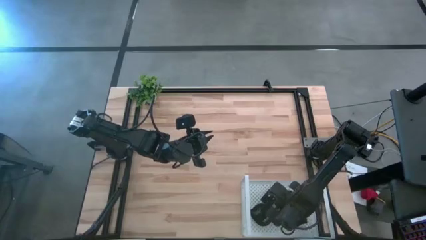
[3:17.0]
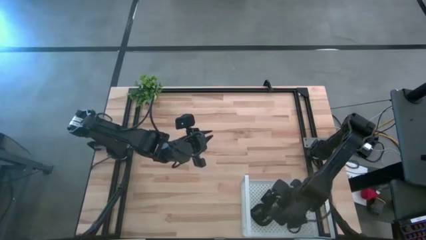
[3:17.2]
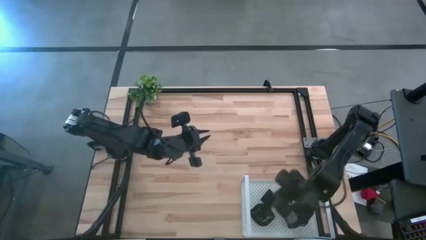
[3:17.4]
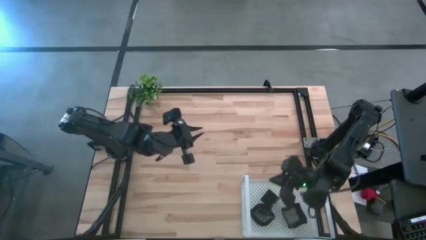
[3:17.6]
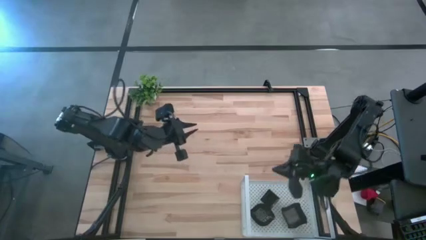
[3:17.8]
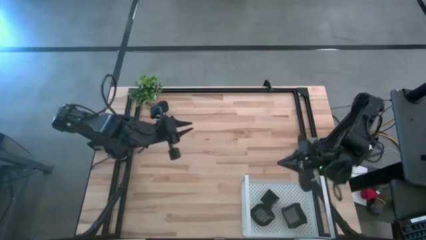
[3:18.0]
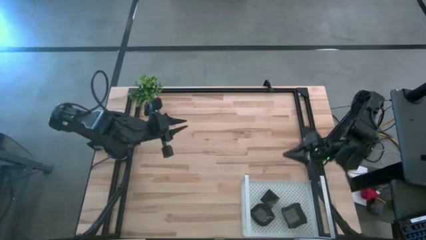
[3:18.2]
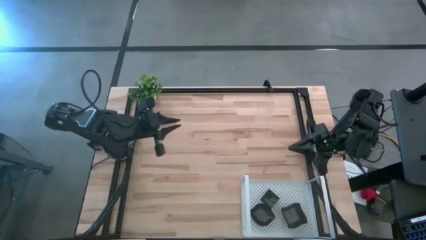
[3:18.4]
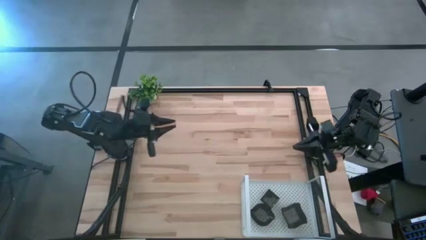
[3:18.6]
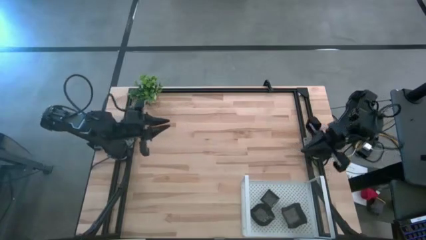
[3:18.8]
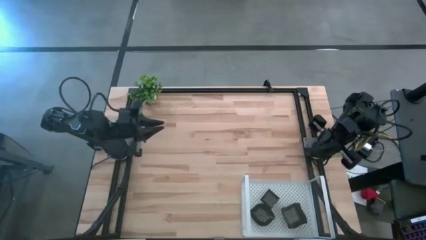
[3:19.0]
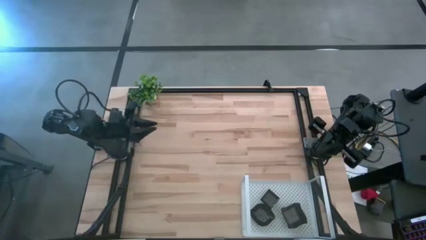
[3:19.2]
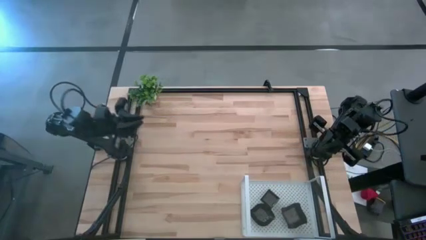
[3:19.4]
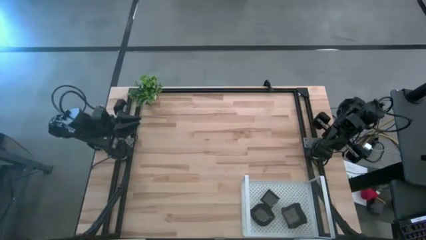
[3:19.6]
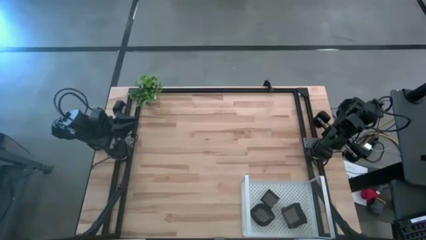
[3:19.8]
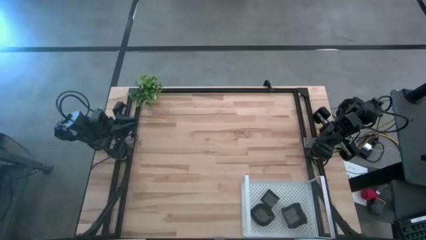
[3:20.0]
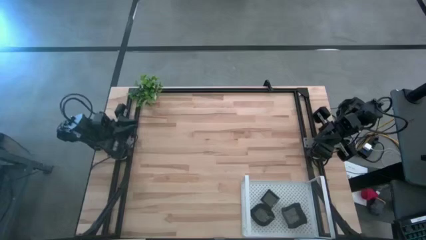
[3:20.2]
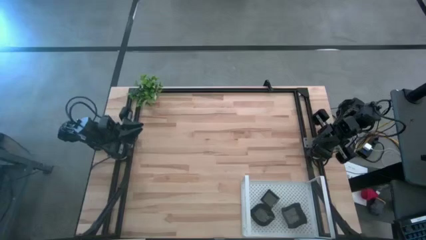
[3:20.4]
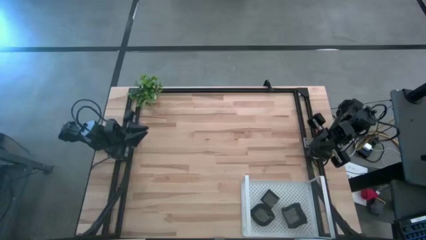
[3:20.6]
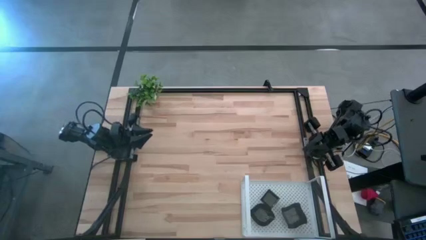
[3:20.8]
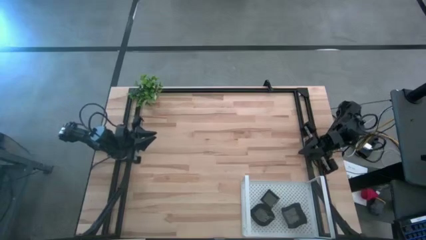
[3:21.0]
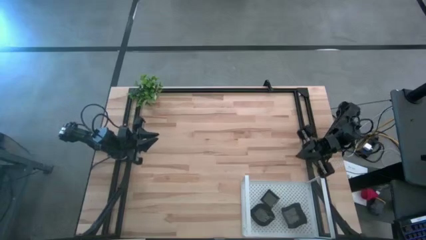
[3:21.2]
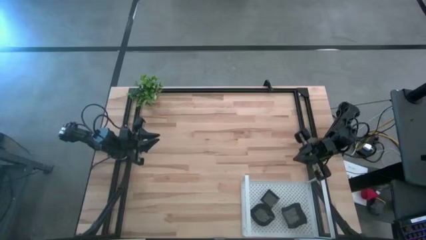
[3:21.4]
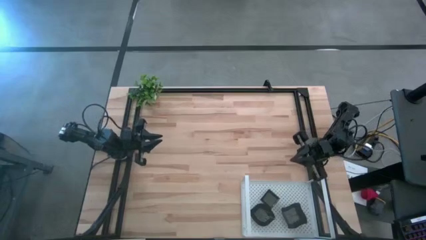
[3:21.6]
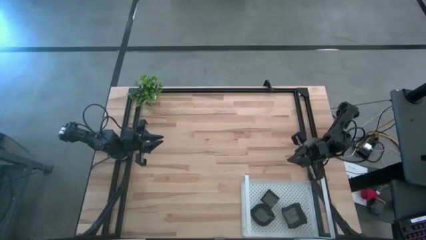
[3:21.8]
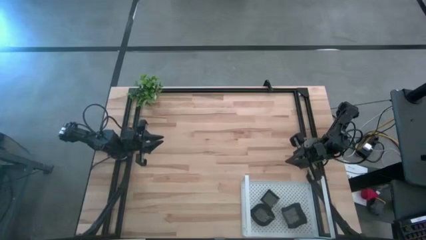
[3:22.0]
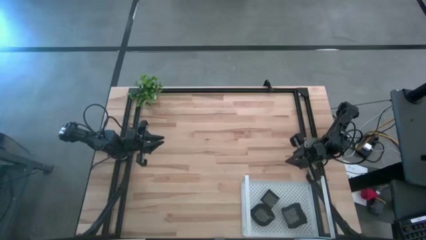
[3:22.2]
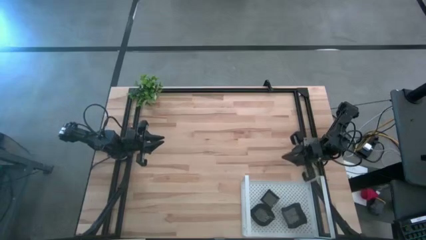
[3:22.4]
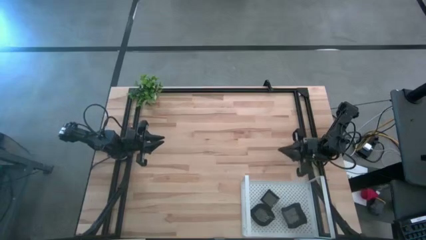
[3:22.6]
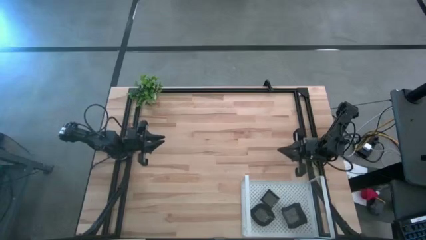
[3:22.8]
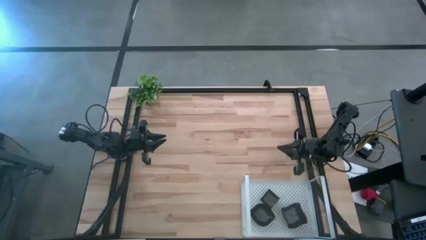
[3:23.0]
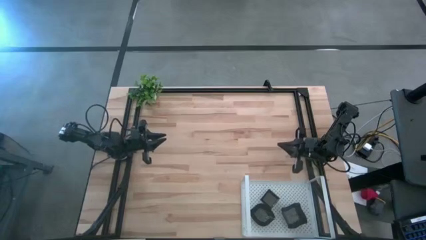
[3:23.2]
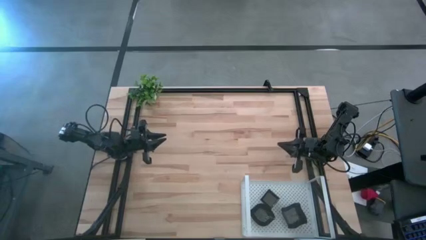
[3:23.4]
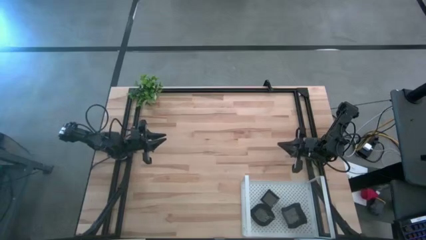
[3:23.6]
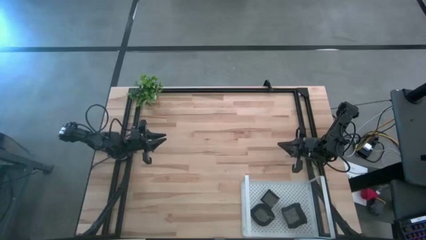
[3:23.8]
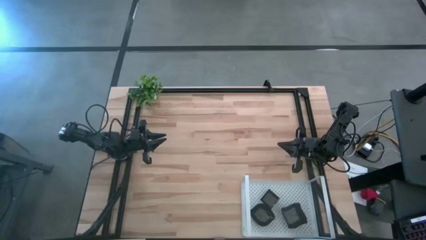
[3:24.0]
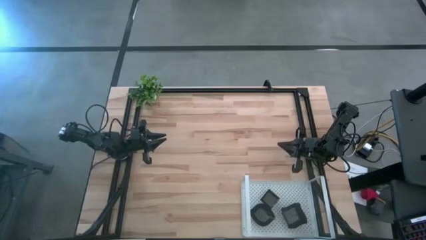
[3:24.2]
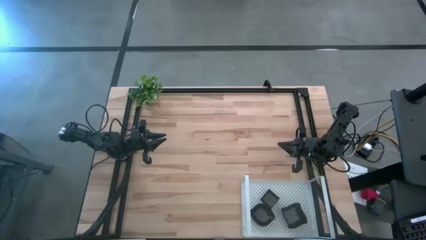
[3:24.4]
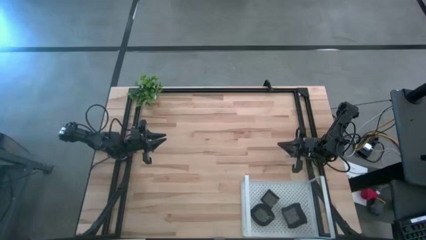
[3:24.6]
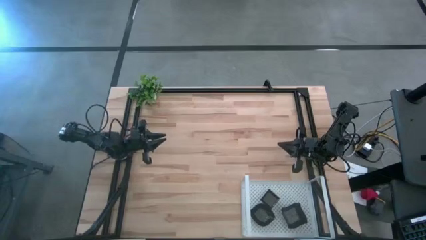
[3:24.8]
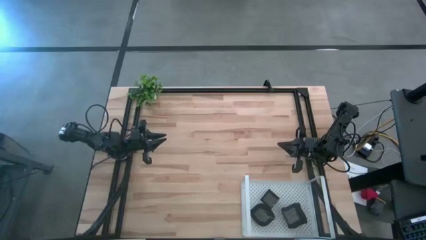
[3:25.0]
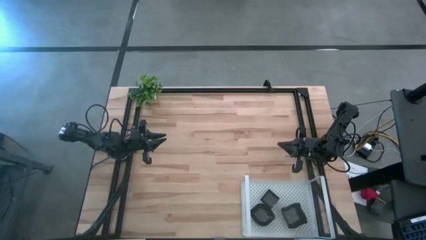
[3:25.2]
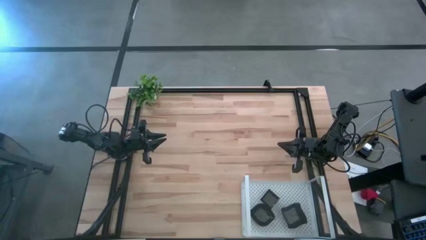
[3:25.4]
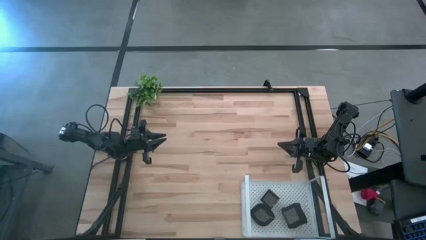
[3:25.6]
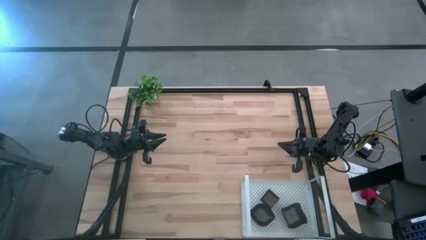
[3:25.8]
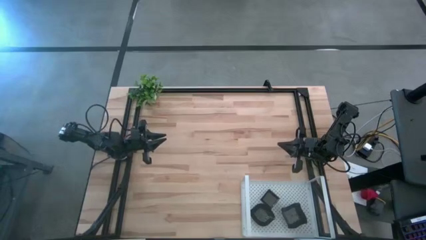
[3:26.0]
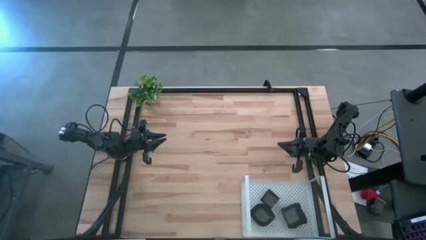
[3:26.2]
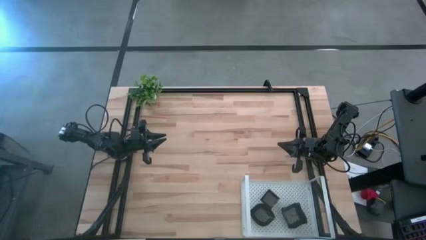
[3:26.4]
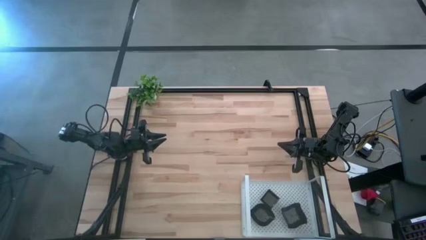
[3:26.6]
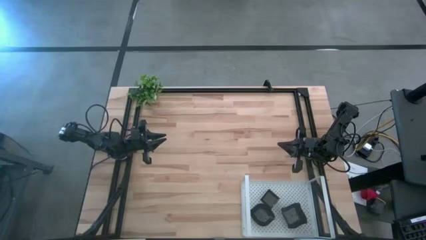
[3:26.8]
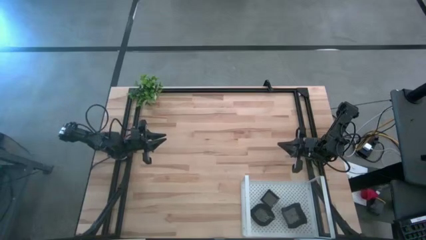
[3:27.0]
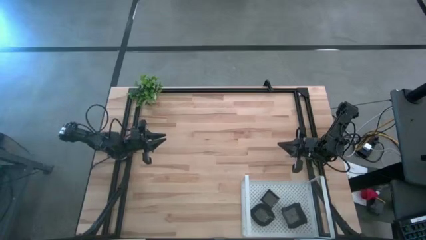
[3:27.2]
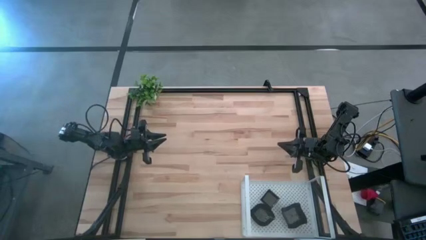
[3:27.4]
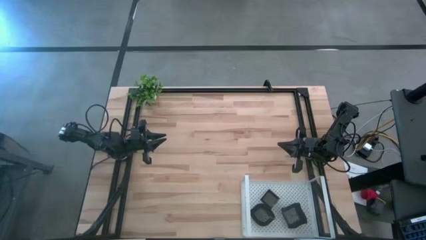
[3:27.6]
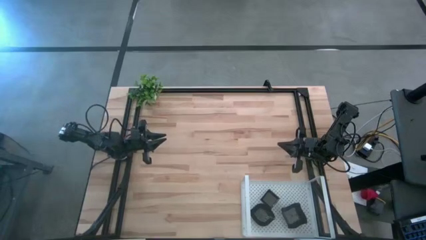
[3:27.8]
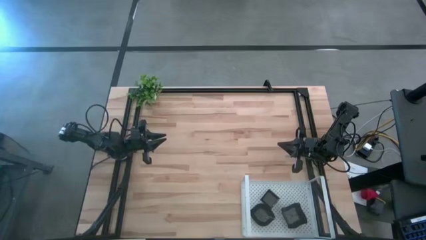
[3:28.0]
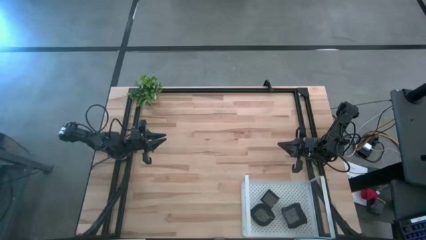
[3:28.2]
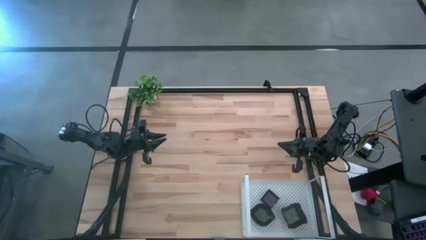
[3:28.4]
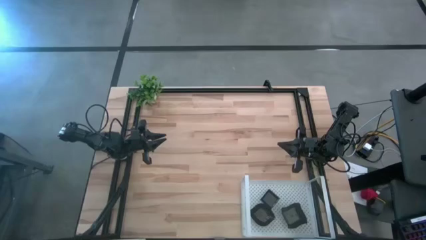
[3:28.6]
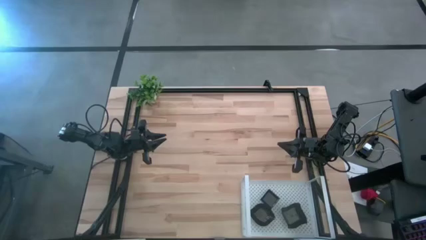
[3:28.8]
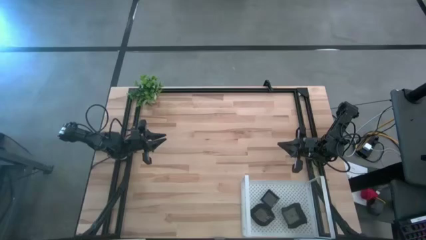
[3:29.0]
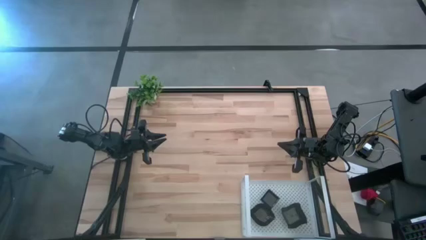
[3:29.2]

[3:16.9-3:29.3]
Task: Pick & Place Mini shaped plates
Return to Home Position

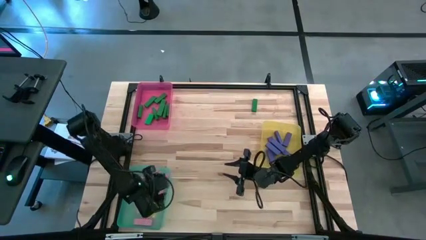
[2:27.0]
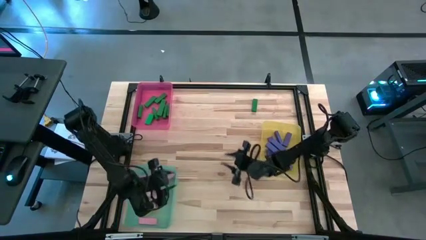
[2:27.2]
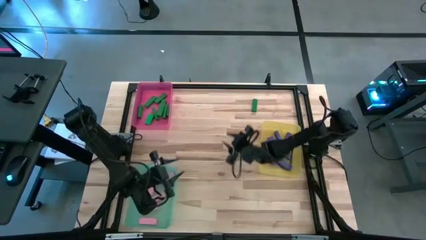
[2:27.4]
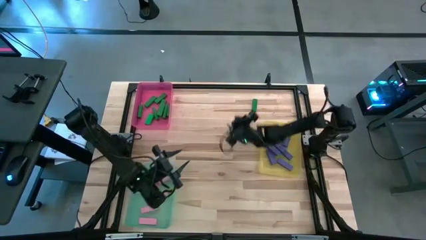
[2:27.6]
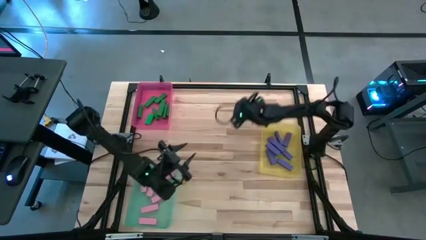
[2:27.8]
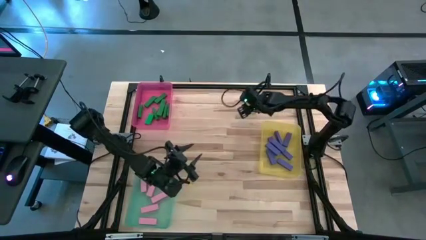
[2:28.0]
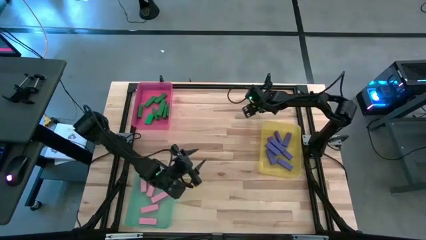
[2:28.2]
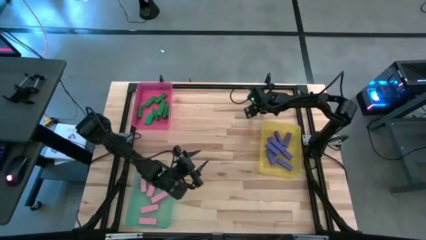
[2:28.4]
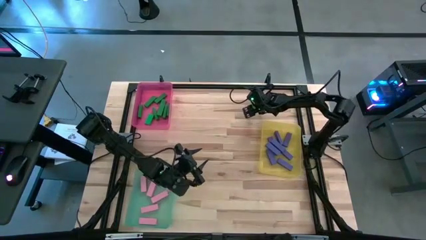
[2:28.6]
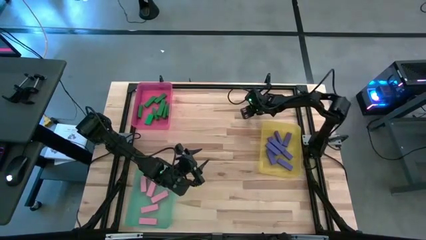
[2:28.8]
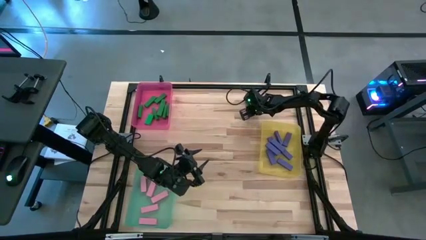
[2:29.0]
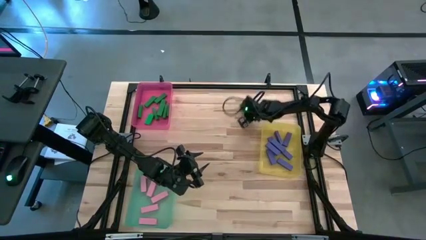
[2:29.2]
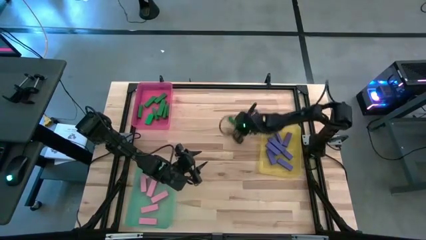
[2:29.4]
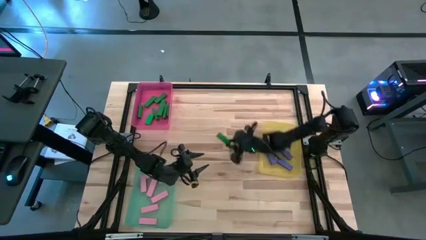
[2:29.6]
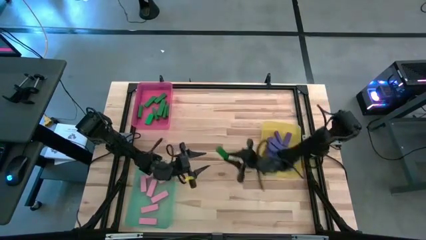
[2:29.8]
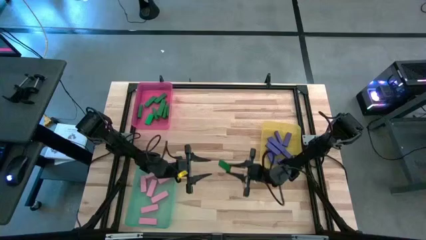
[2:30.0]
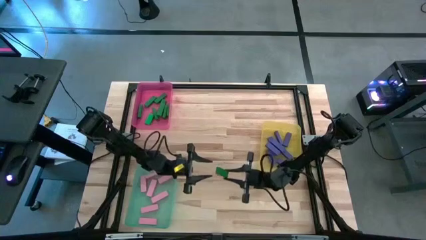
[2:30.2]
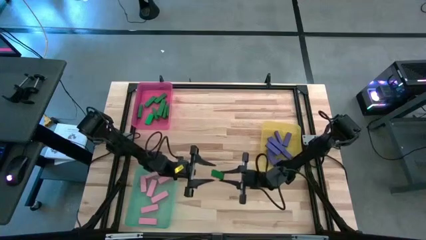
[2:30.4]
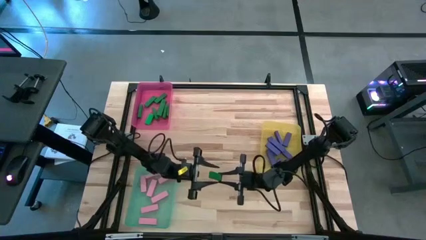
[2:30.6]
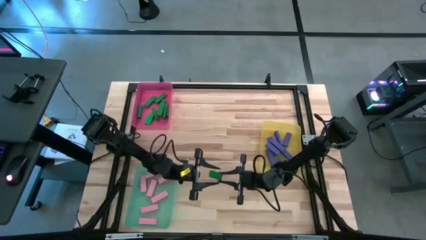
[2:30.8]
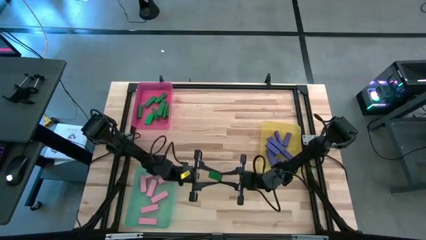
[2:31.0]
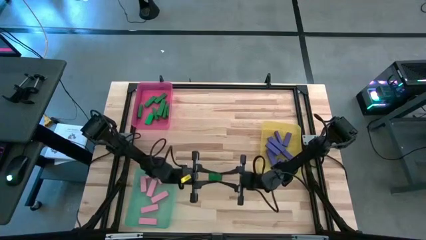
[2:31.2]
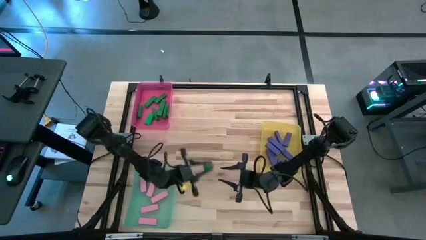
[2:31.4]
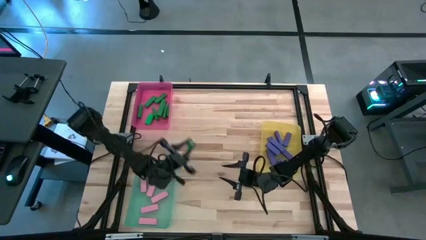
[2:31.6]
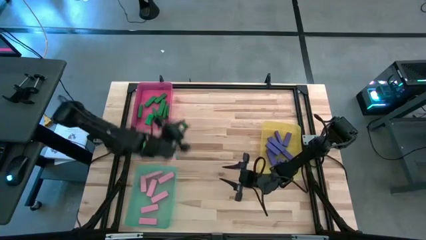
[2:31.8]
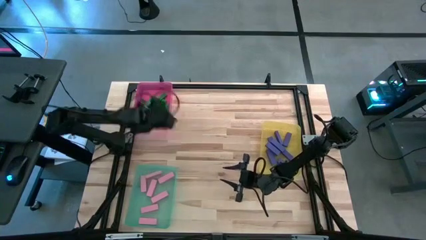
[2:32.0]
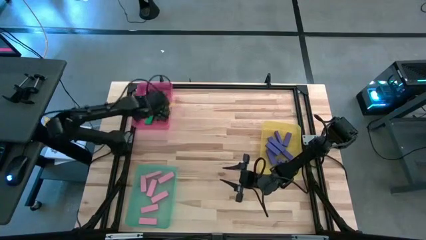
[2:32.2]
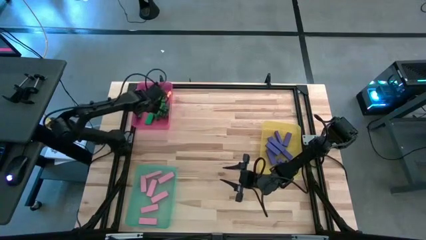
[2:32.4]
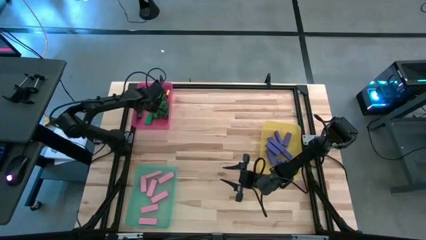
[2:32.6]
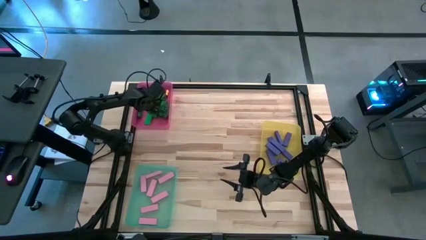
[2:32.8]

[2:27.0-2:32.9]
Task: Sort blocks
Put the green block into the pink bin
